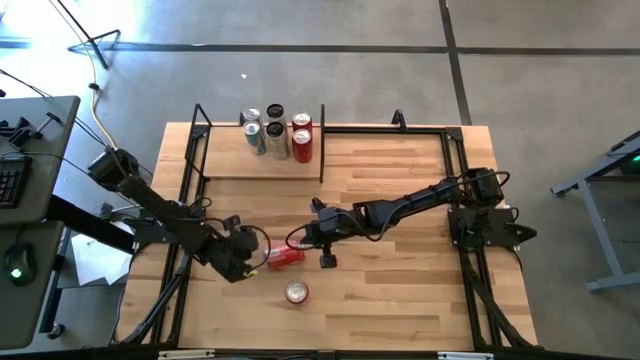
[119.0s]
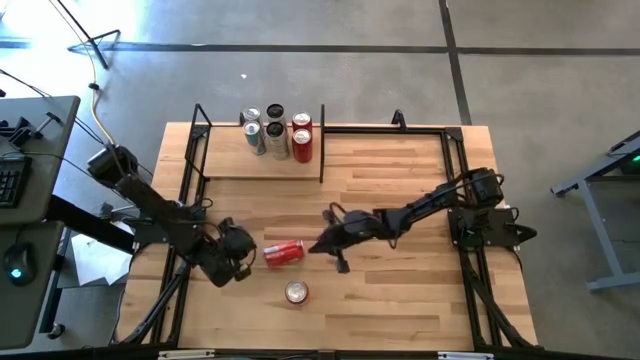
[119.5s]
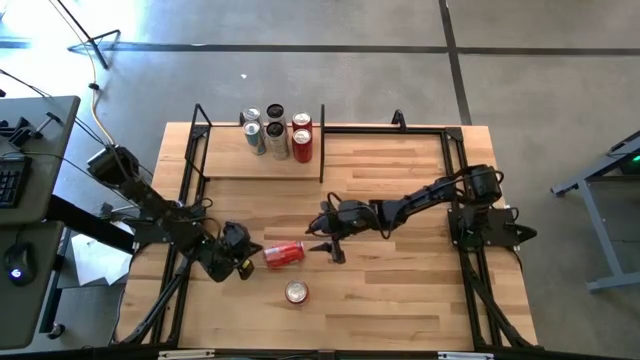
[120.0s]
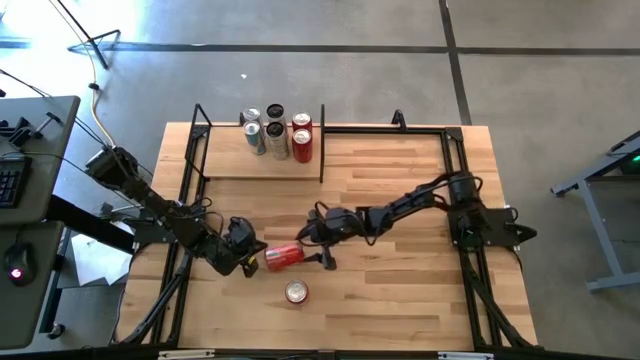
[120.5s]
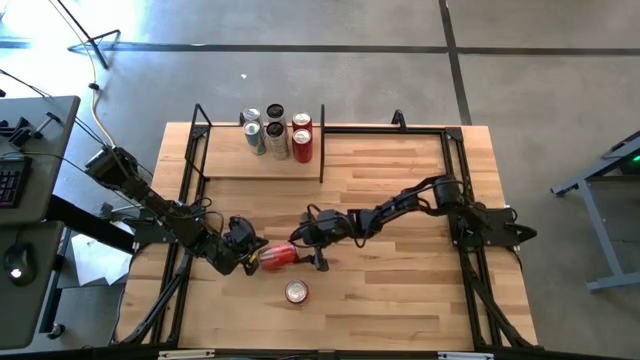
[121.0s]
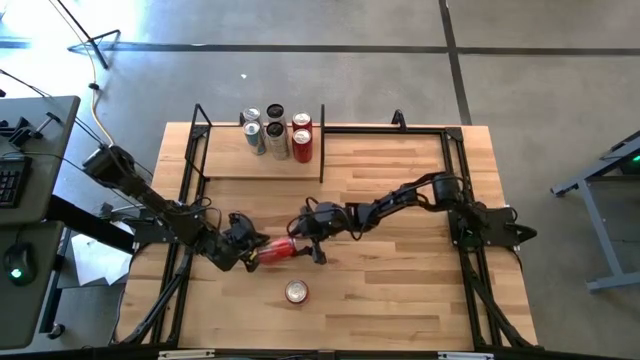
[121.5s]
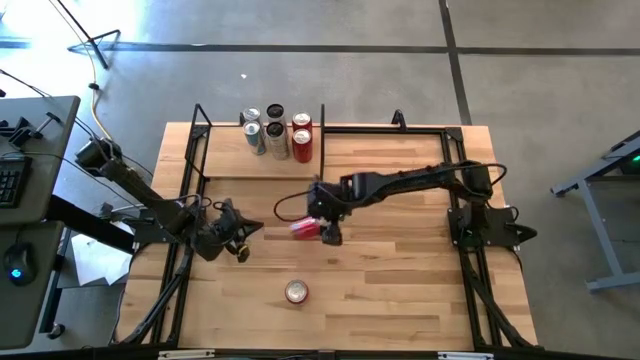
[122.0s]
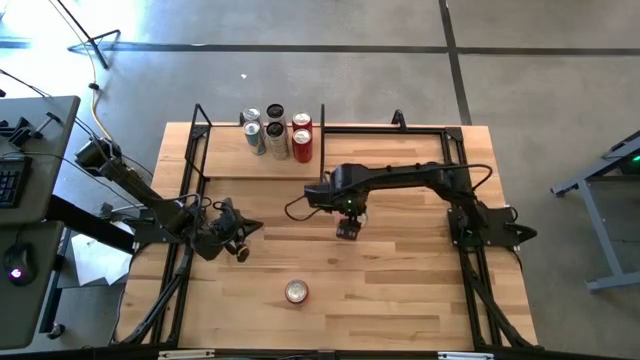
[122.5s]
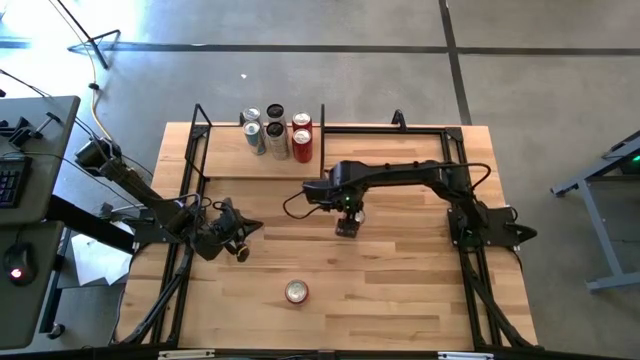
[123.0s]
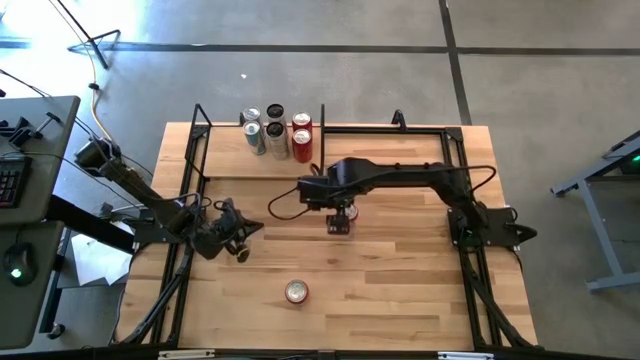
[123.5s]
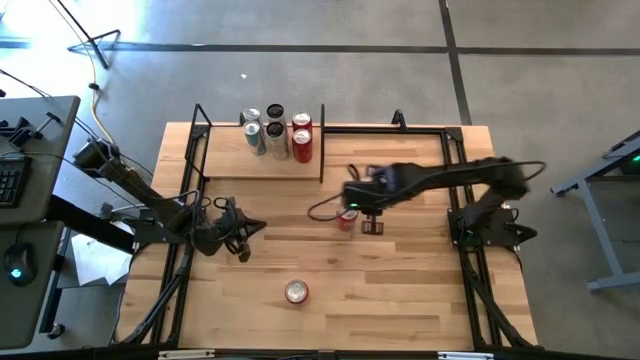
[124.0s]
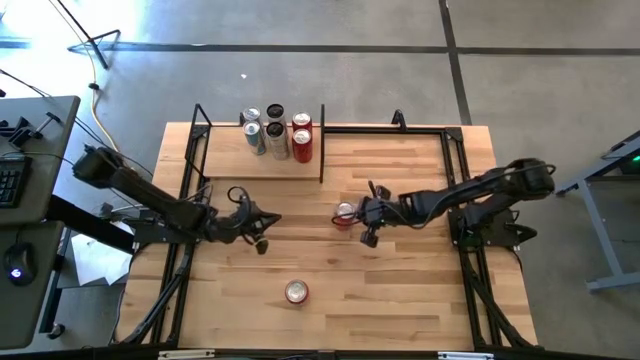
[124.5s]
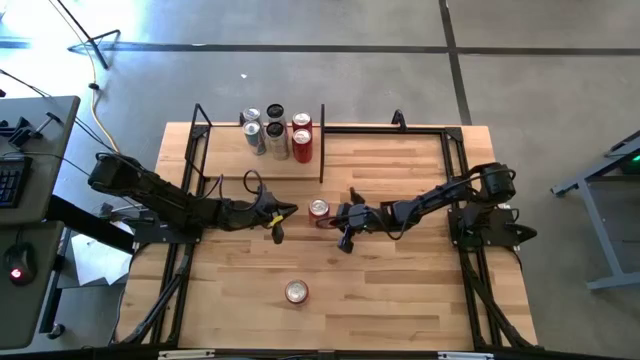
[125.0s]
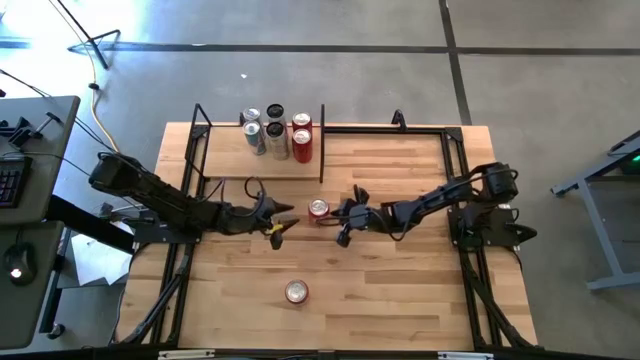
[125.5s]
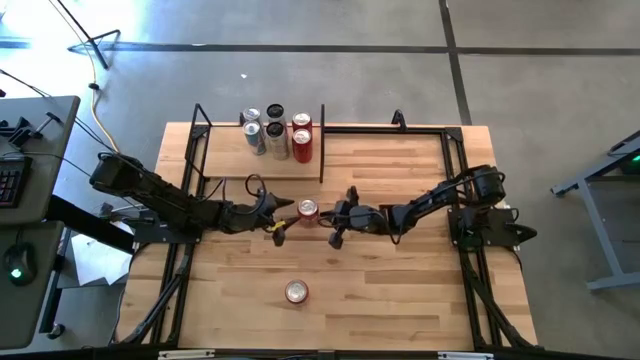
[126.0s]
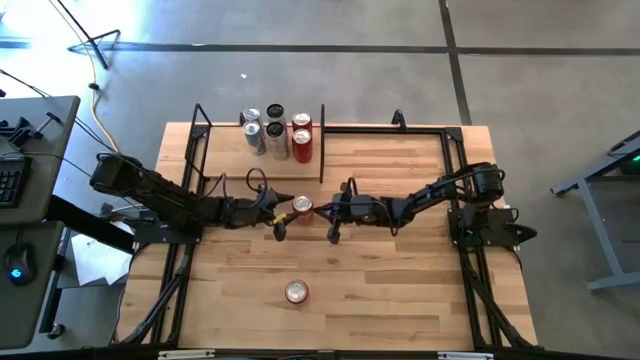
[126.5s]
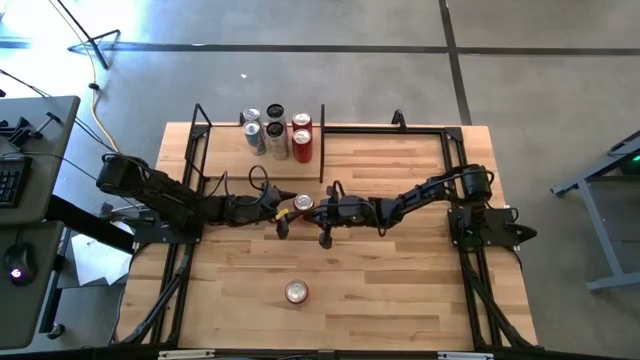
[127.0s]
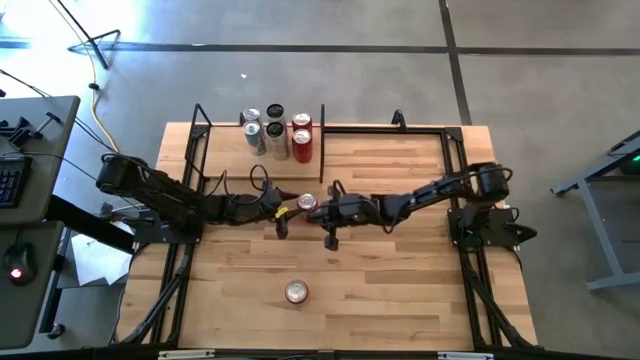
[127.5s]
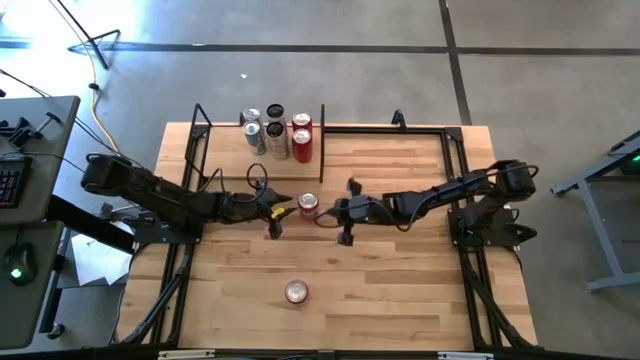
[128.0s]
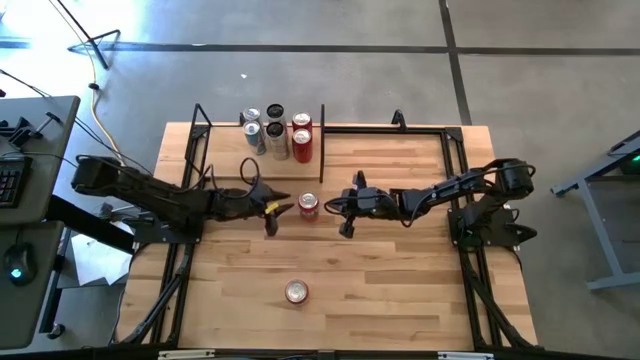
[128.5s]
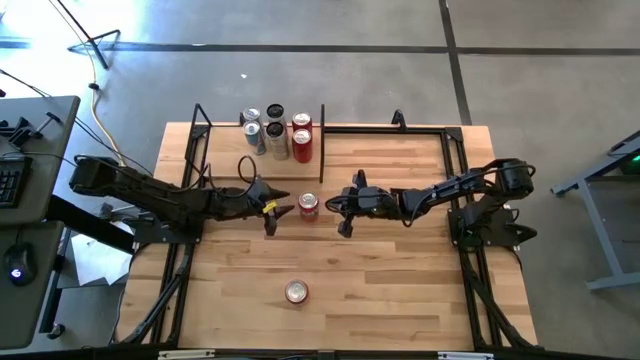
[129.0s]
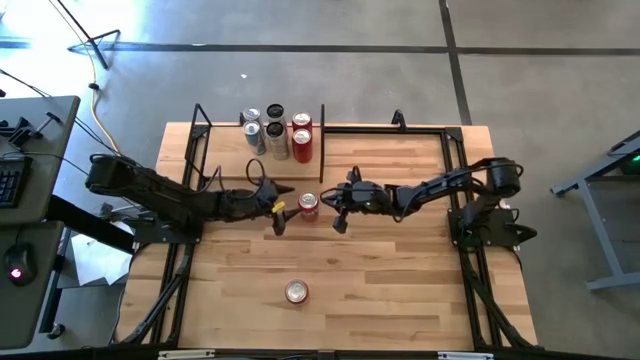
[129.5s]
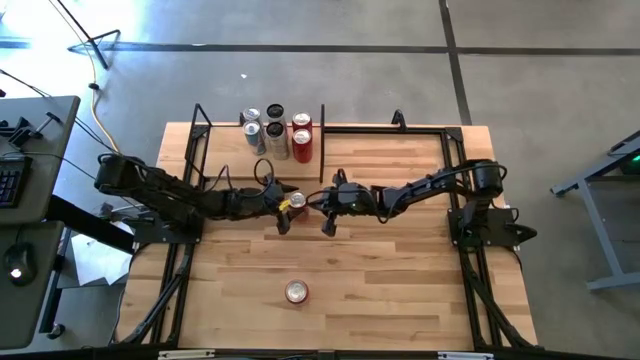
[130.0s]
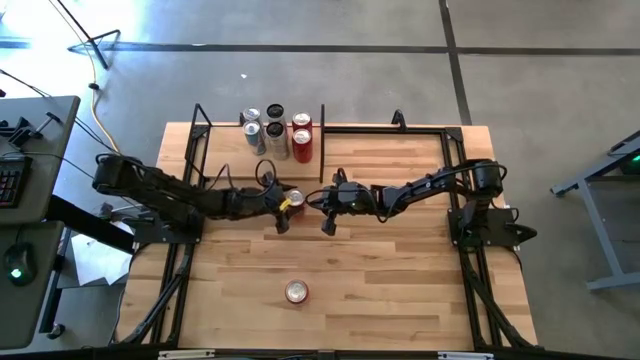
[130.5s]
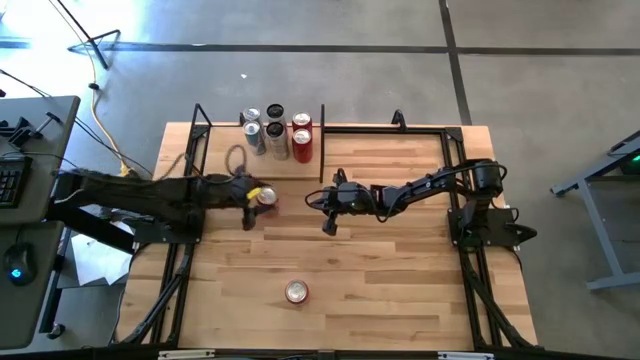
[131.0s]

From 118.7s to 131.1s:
Task: Place canned beverage on shelf
Put the top red soda can on the shelf

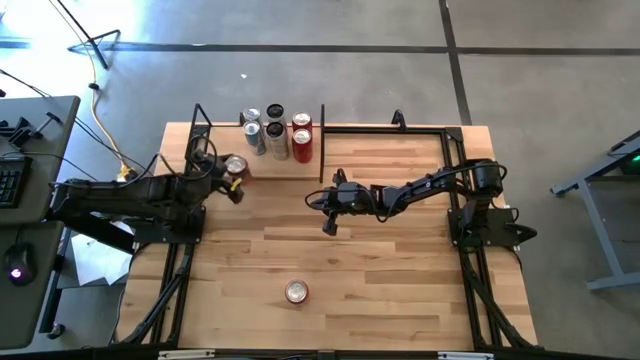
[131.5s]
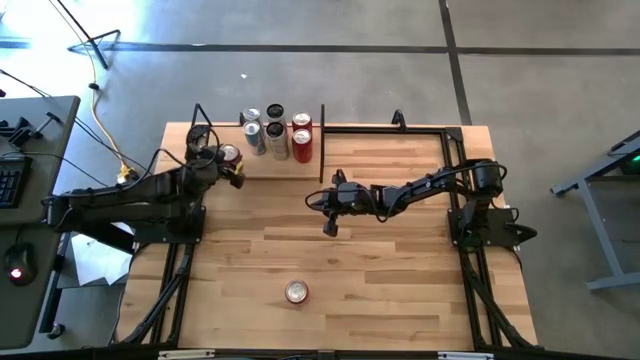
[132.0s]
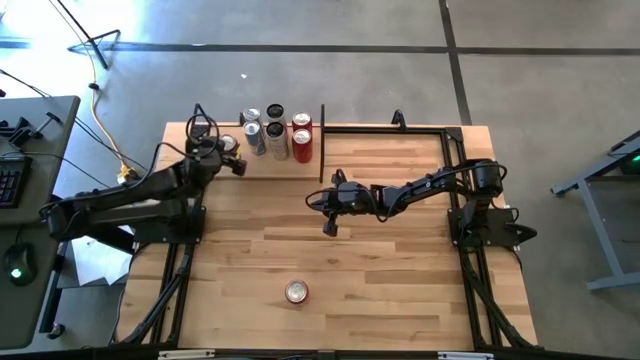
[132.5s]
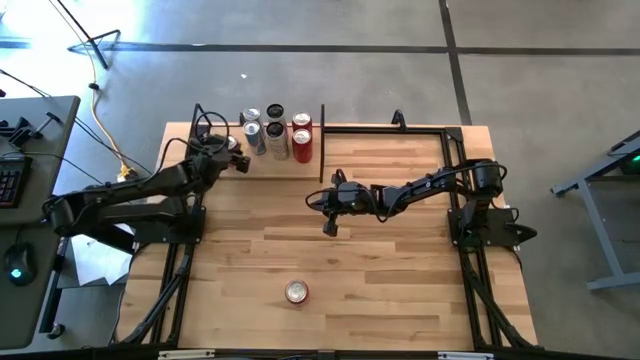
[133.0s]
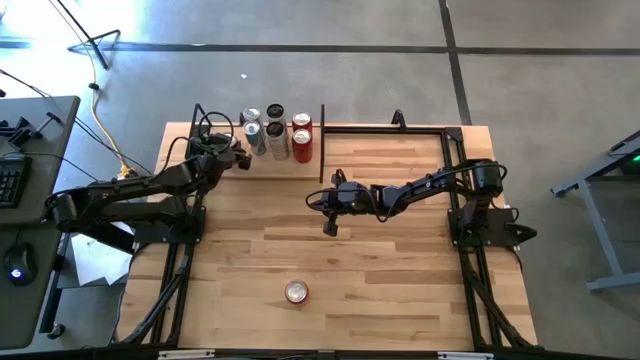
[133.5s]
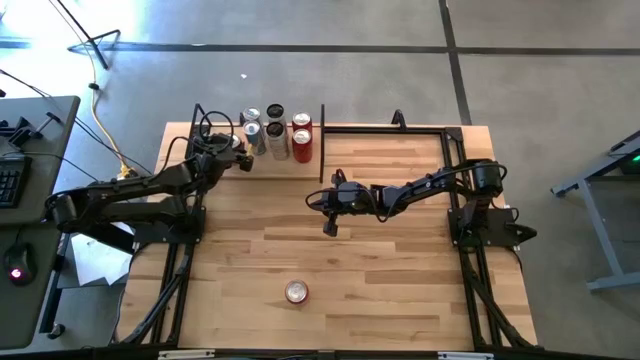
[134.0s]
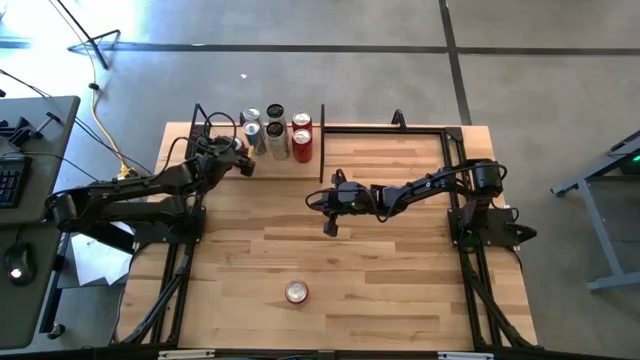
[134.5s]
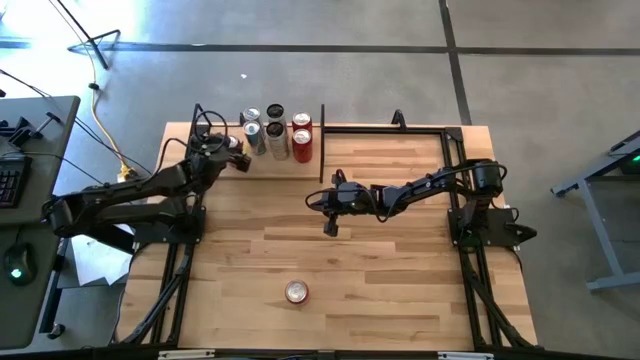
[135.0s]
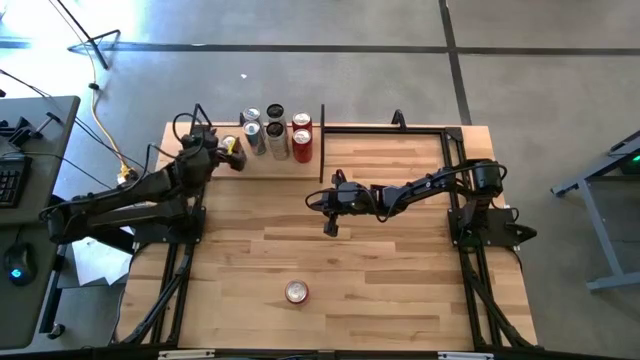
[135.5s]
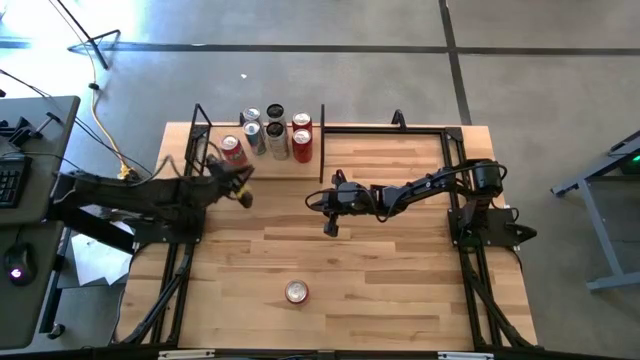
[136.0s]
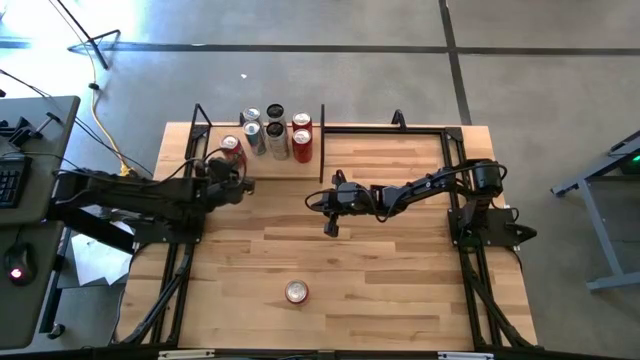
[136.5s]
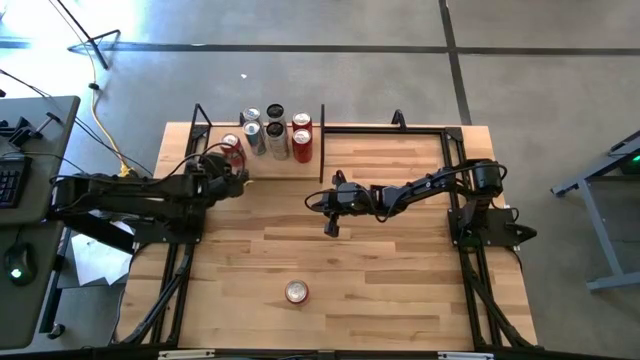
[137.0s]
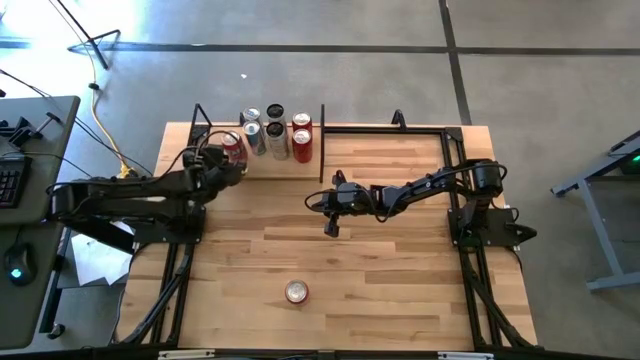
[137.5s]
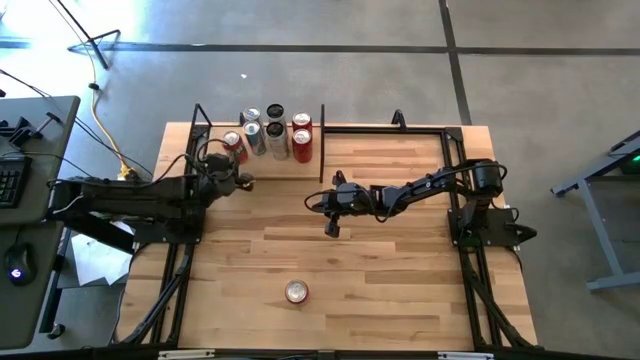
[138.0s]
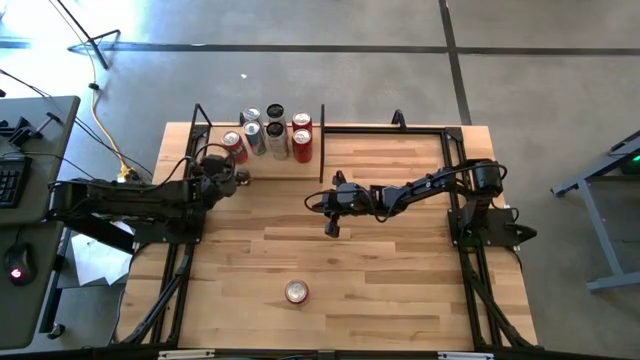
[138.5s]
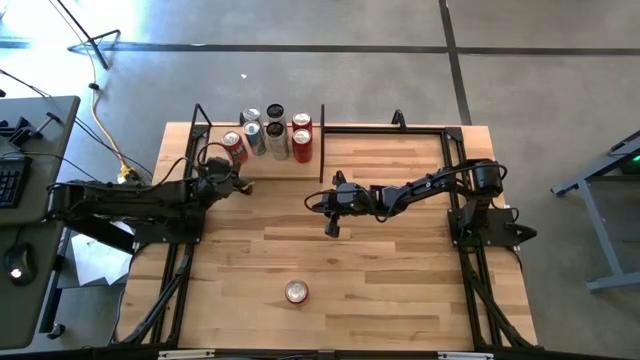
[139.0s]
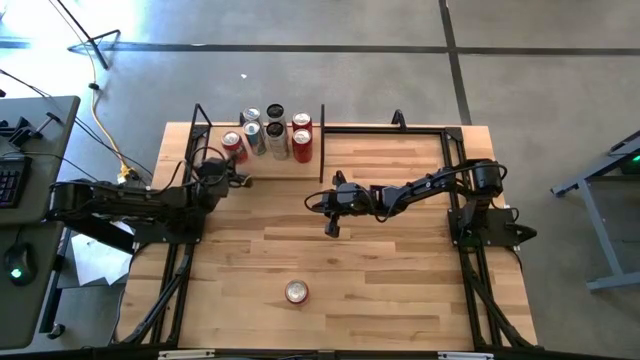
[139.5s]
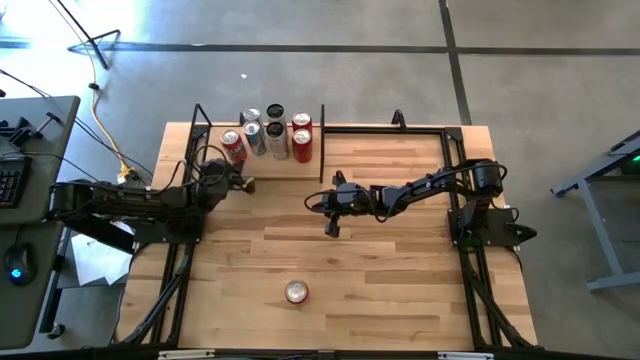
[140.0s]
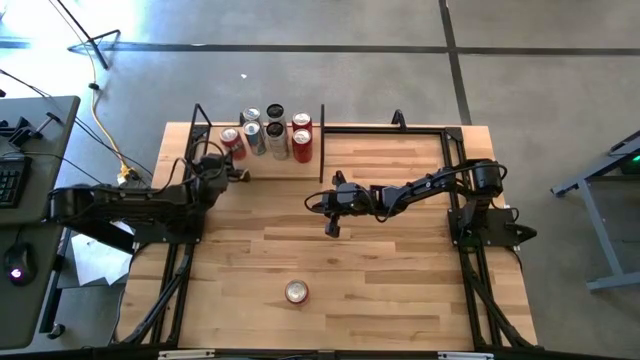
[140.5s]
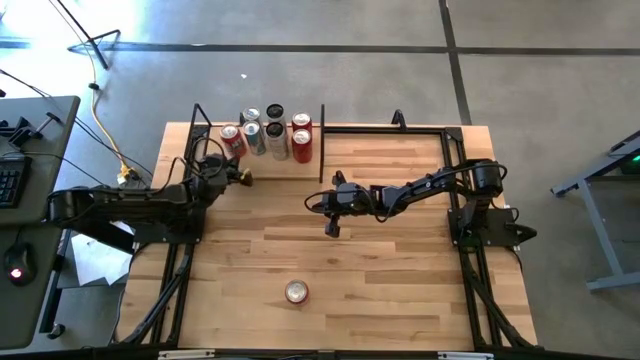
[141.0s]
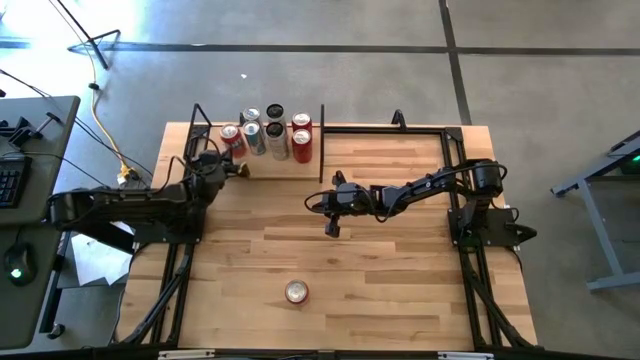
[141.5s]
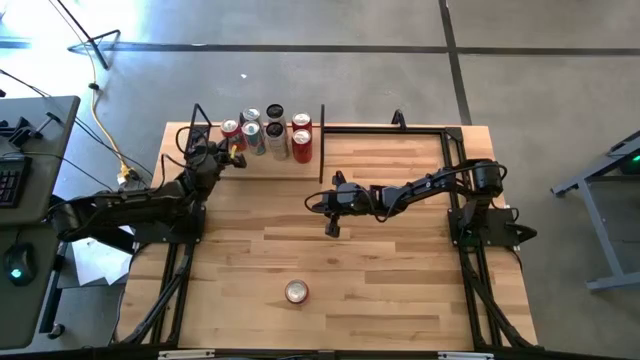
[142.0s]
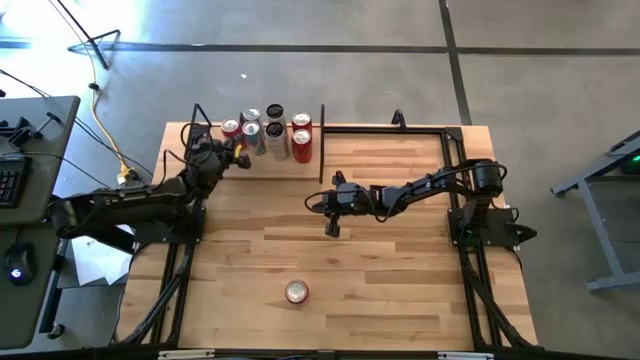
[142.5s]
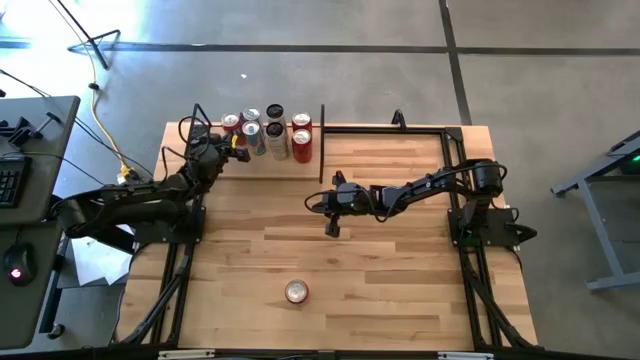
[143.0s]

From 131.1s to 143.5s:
Put the top red soda can on the shelf
